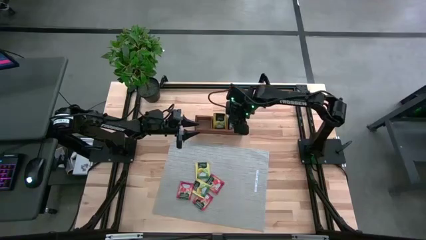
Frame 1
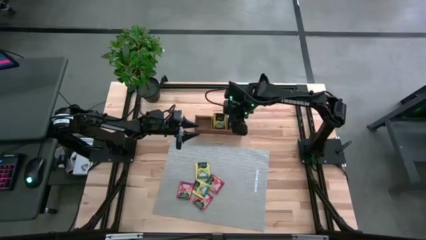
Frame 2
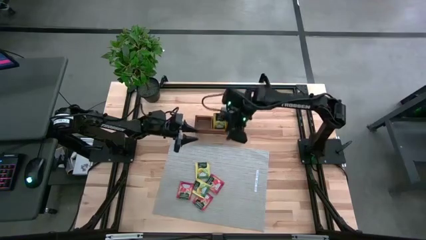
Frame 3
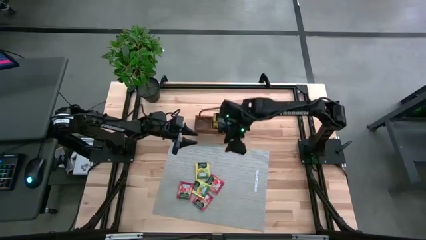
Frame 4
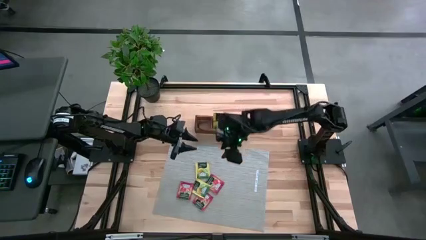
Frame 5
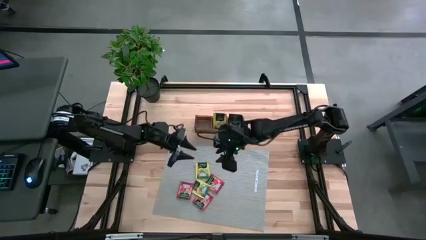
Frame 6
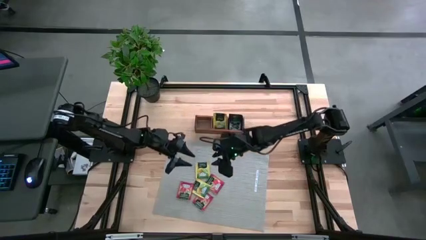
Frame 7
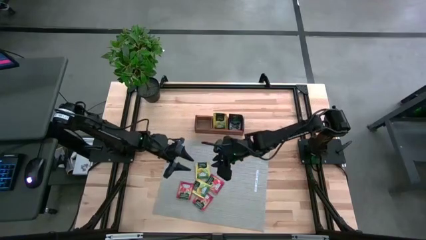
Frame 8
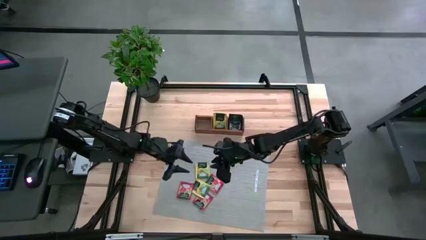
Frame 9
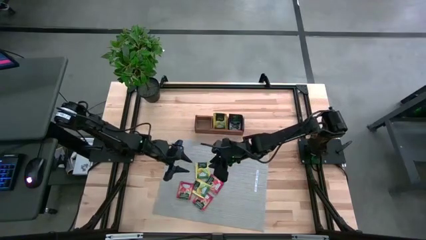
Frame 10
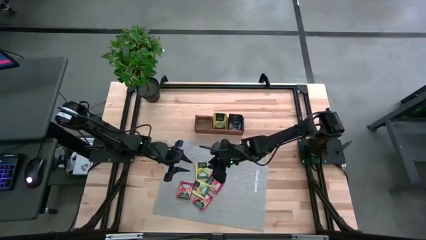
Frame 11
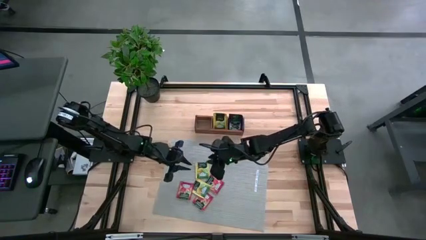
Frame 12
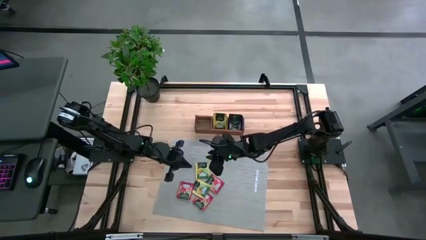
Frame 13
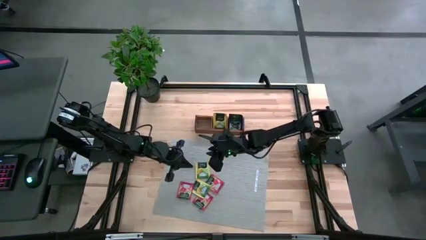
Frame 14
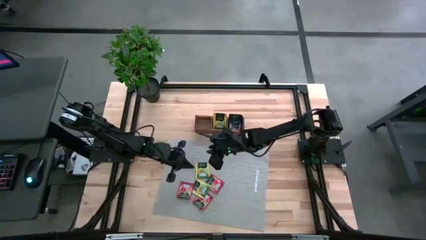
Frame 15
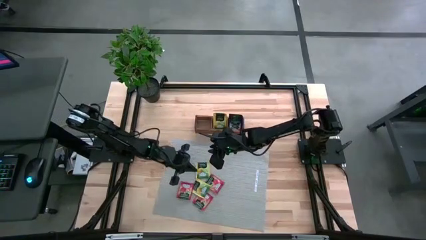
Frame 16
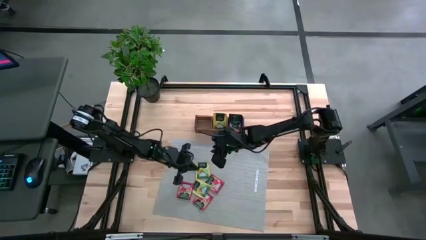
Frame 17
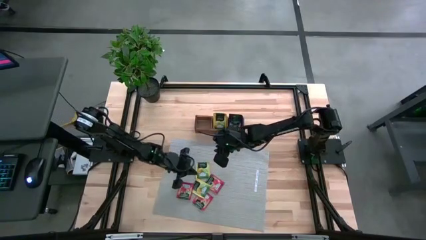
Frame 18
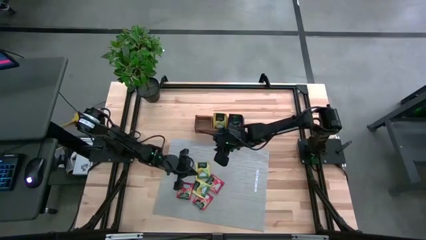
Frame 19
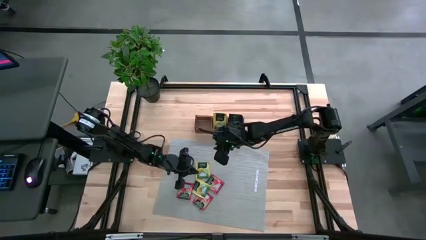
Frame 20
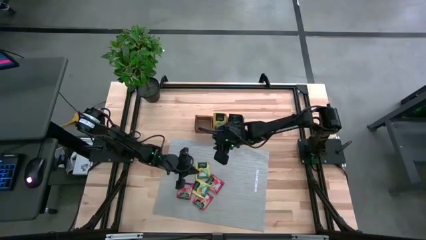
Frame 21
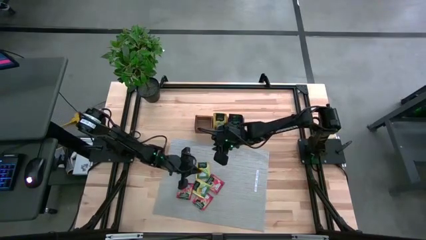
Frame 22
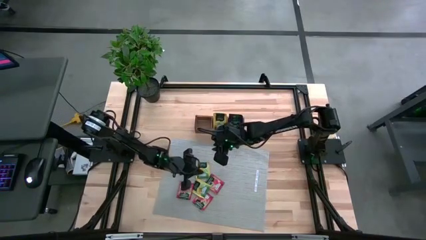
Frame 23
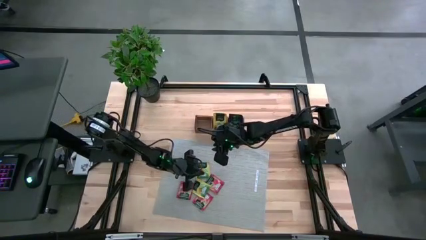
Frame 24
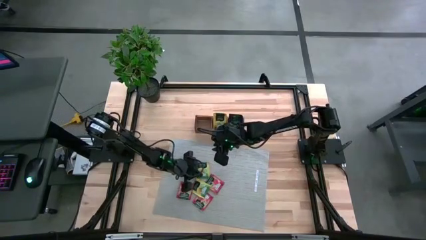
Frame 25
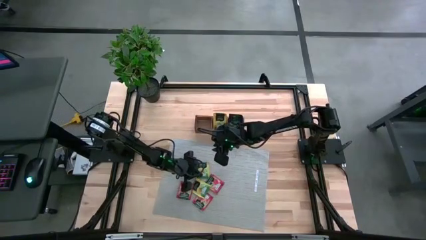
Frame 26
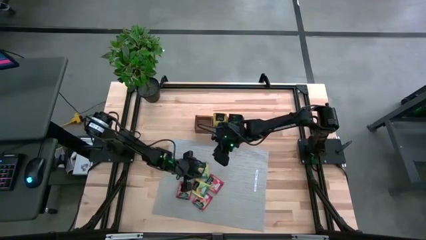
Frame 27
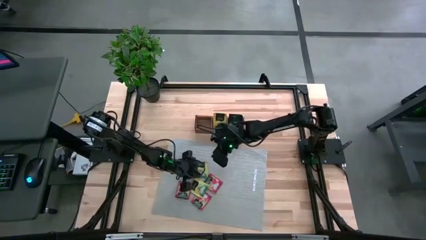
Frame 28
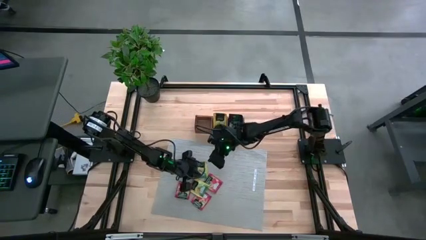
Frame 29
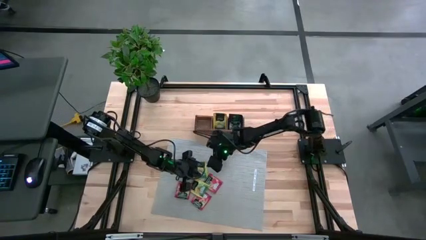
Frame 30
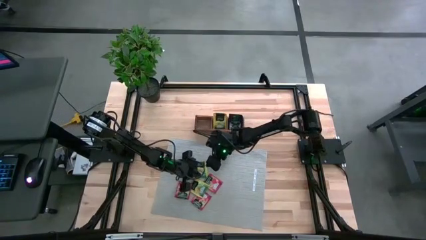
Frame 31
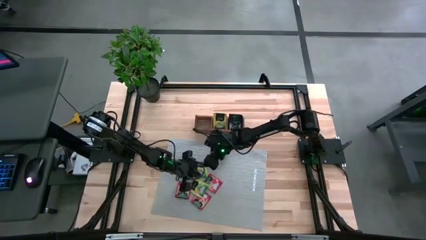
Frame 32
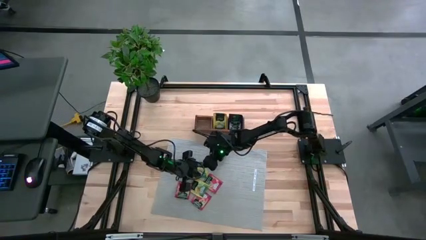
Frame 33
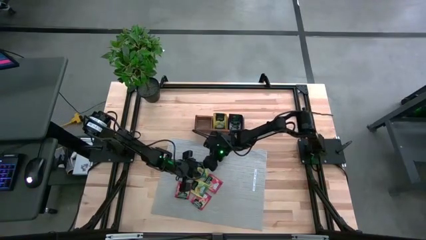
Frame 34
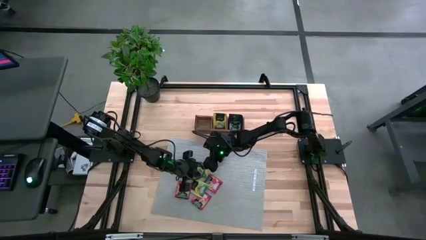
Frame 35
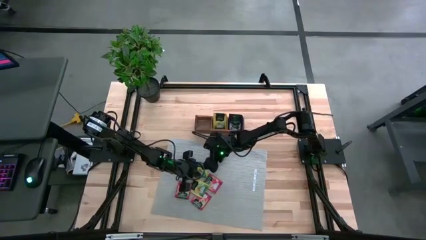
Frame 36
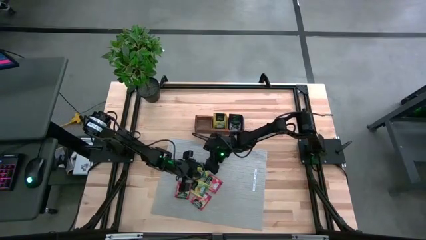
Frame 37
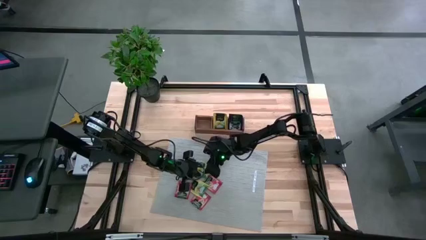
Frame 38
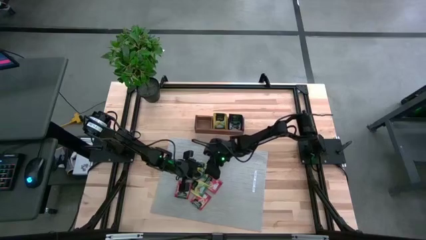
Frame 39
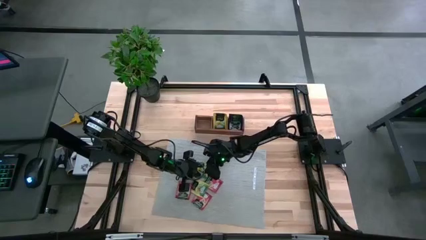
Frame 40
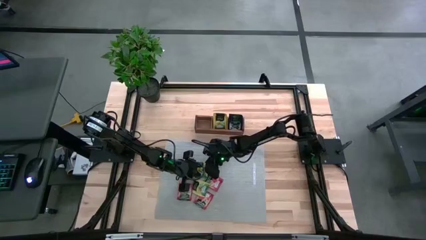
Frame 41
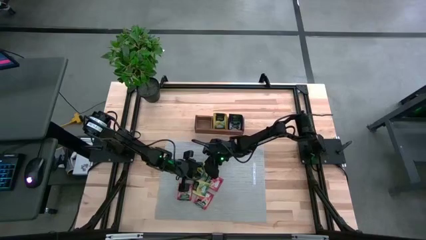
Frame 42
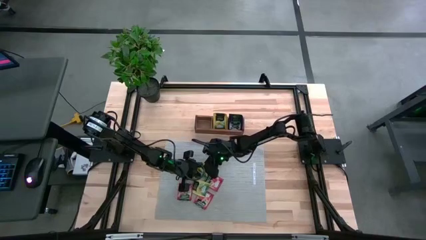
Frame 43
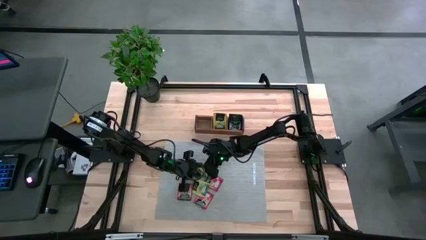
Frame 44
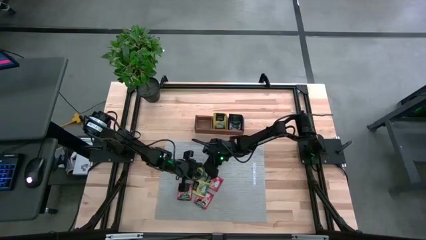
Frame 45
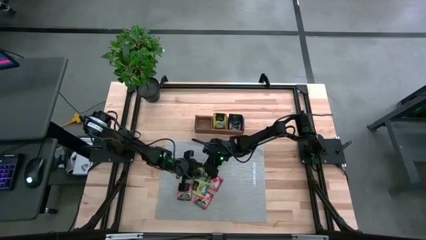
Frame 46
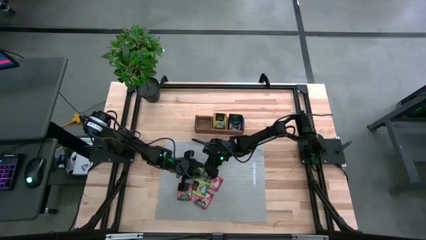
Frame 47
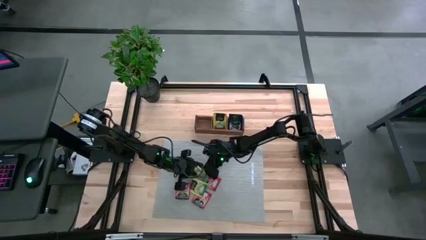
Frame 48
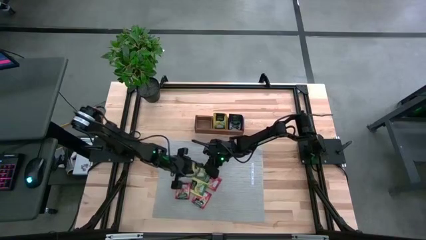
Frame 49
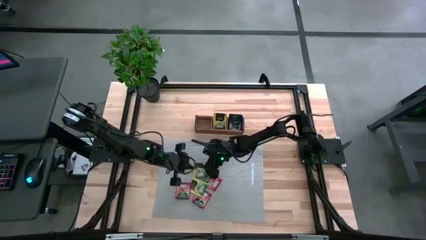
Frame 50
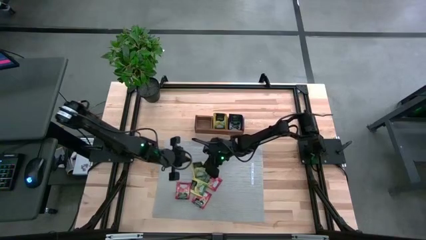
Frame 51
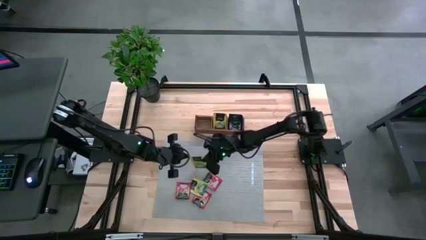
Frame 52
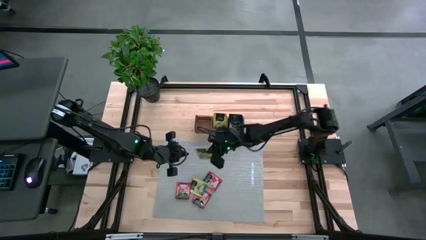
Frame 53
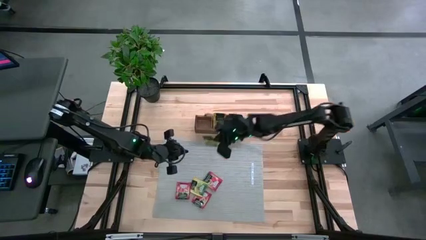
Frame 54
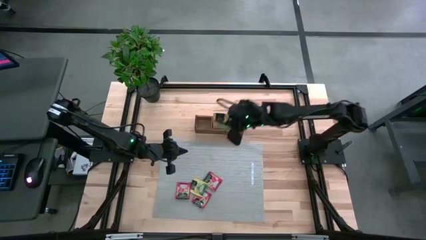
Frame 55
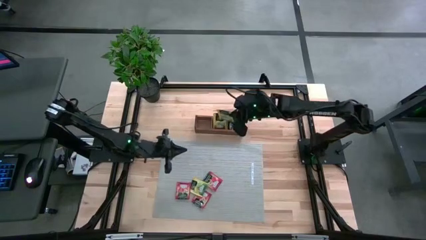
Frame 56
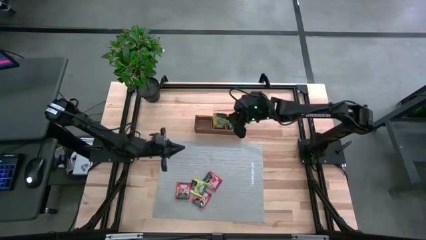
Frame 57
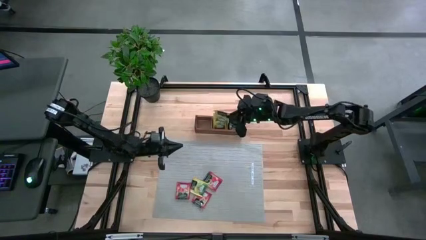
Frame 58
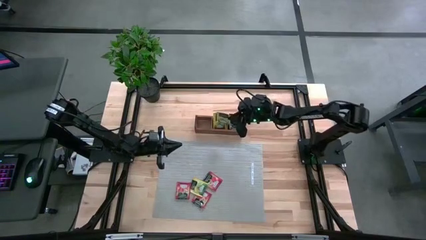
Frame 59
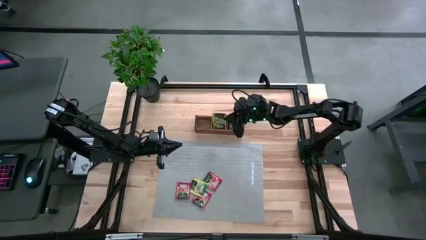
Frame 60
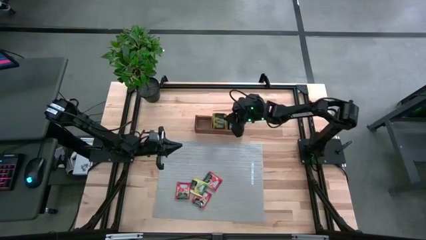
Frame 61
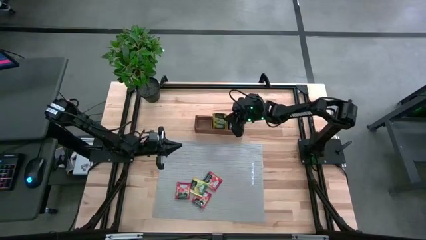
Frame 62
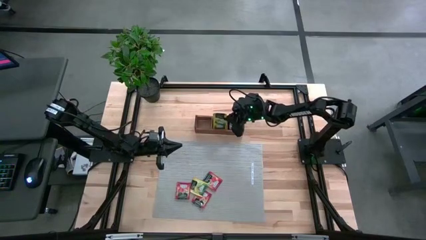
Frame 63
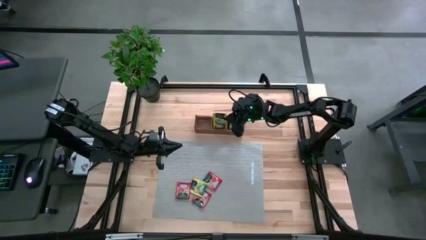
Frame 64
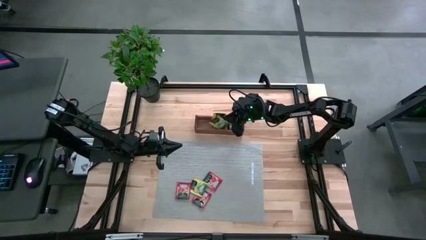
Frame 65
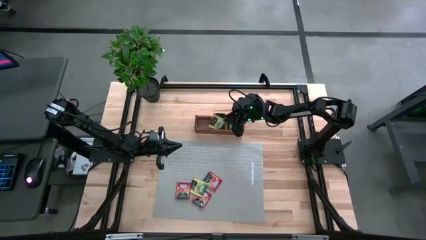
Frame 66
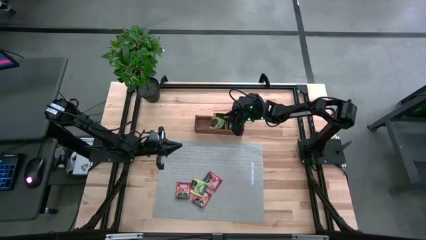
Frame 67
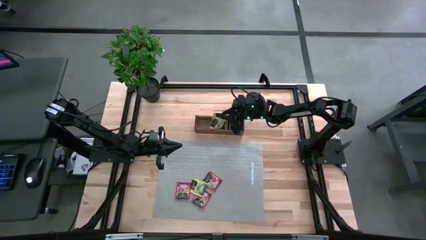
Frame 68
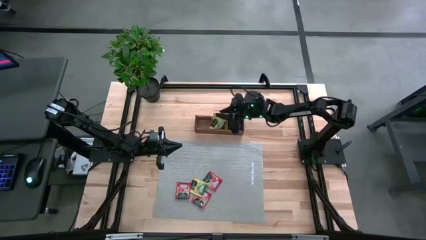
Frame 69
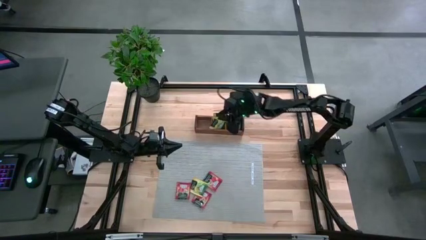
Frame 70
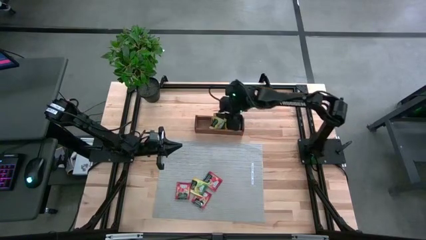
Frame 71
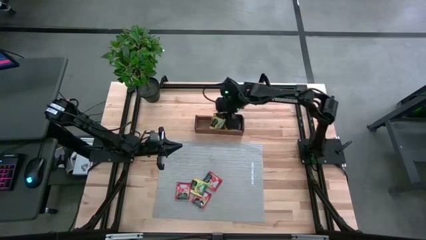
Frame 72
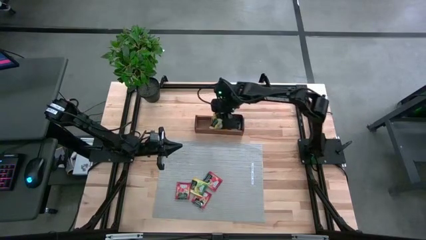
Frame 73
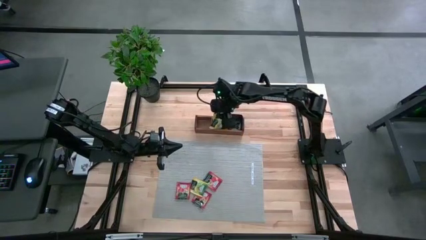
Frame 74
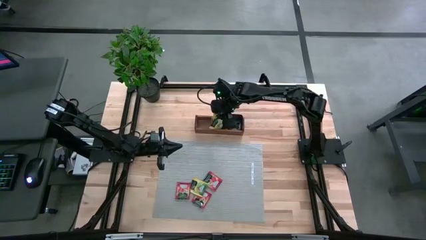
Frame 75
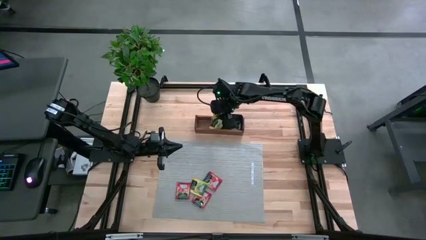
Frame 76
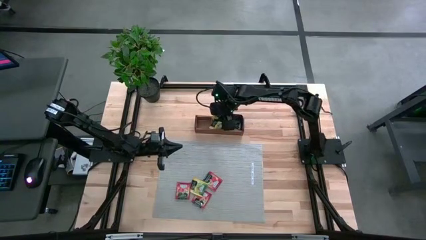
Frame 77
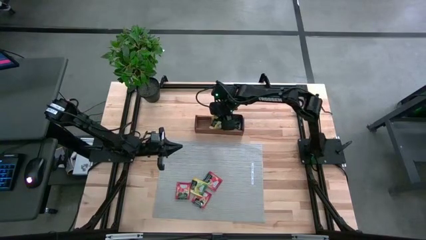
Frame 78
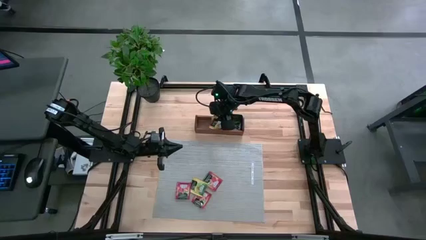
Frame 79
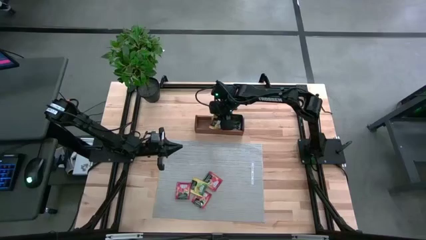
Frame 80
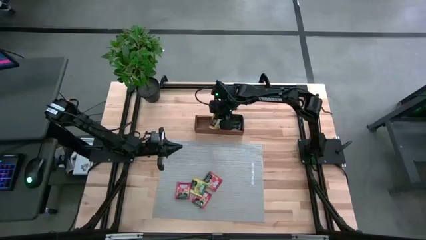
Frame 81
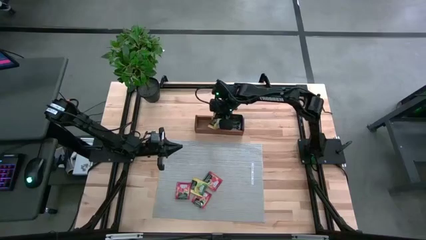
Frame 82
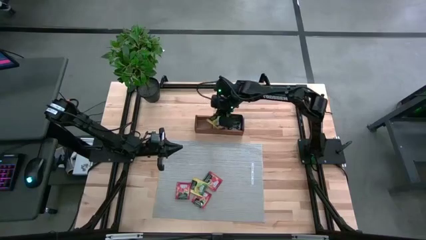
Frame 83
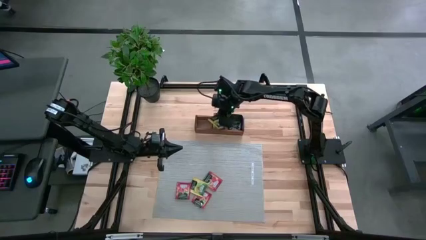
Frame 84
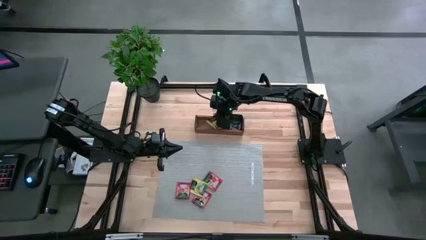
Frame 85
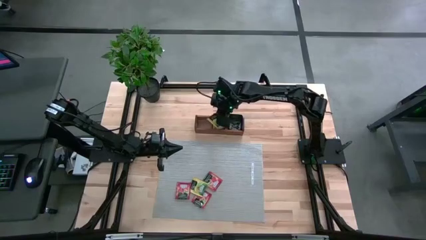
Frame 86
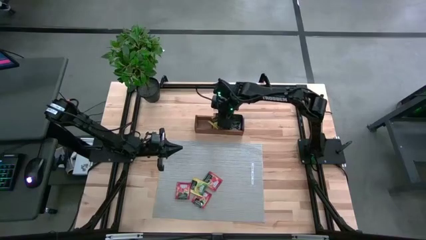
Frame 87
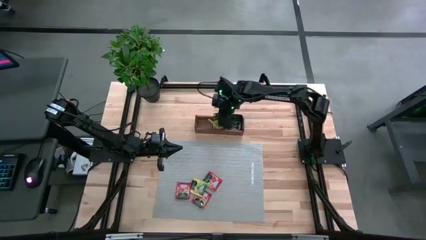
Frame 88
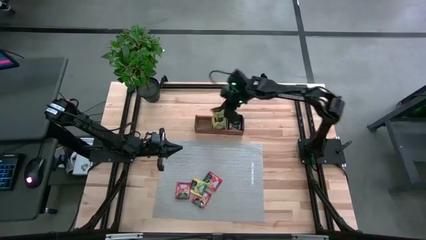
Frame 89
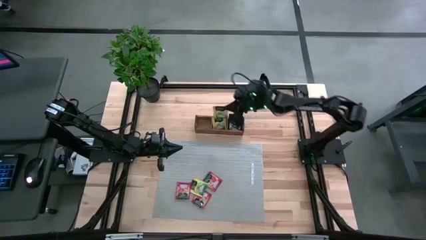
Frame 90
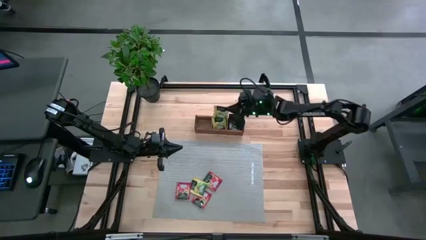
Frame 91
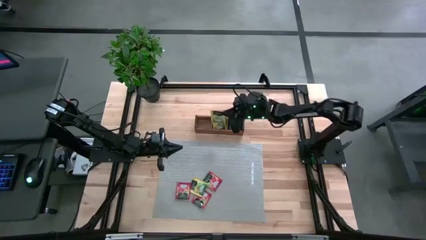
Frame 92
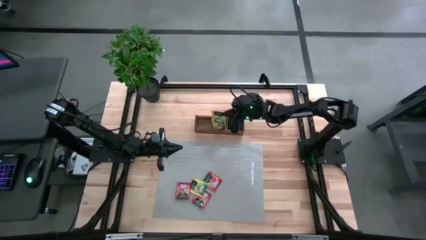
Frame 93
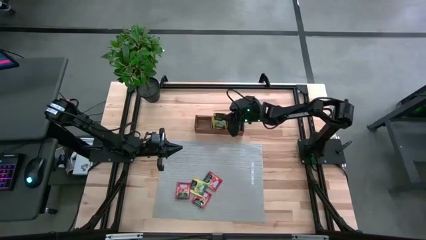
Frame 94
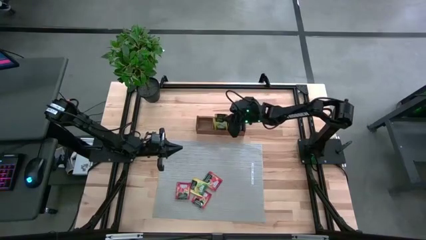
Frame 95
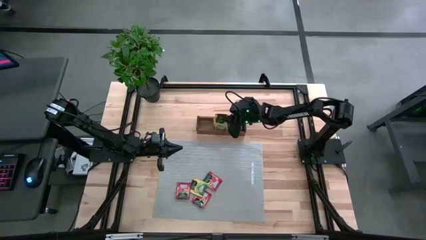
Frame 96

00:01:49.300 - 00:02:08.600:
Task: Pick & Place Tea
Put the yellow tea bag into the middle section of the wooden organizer
